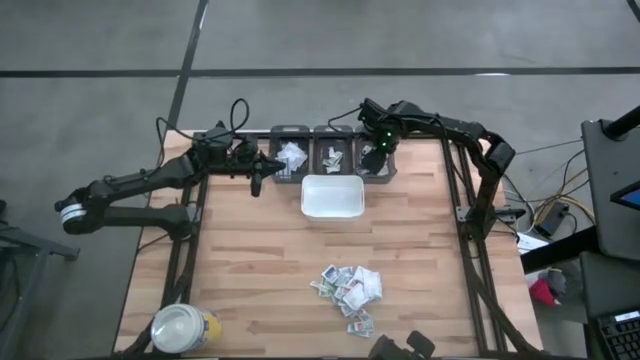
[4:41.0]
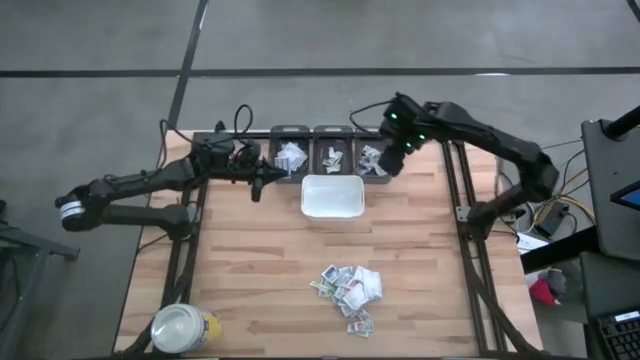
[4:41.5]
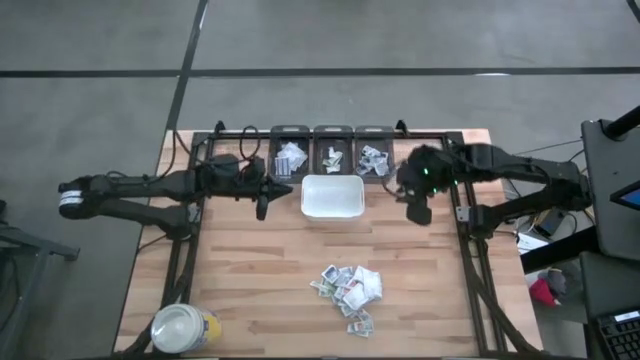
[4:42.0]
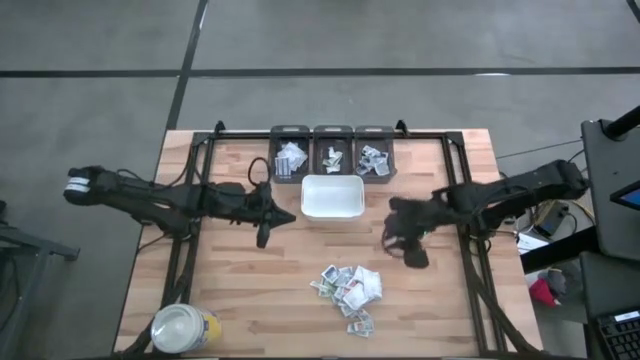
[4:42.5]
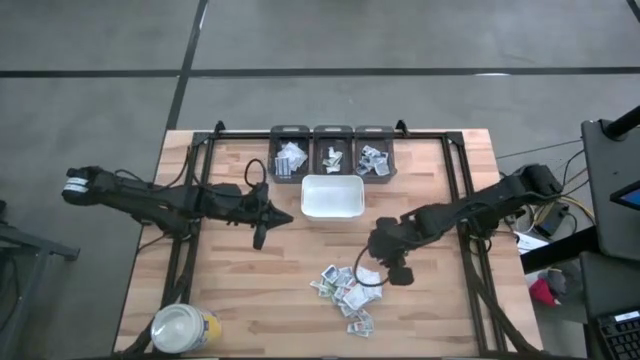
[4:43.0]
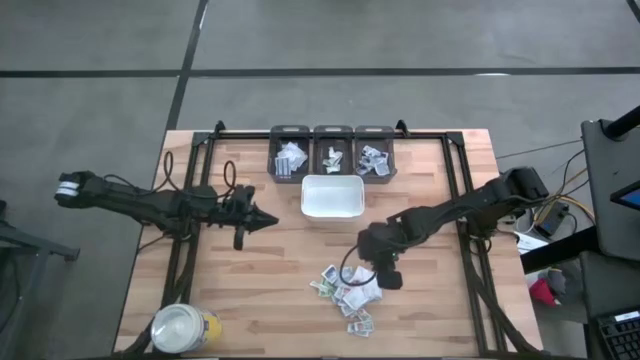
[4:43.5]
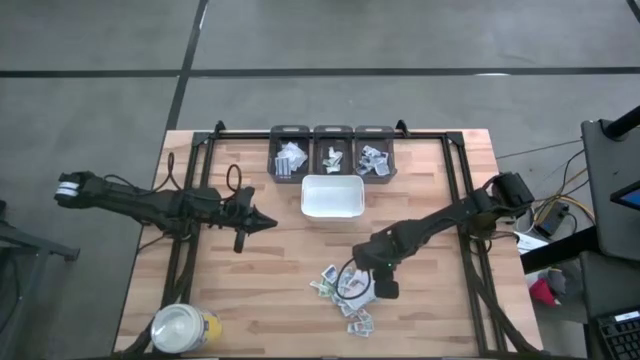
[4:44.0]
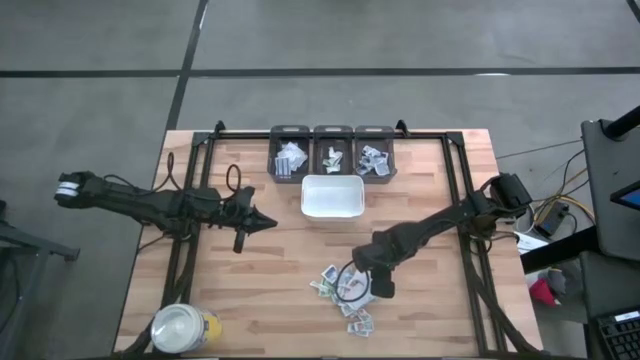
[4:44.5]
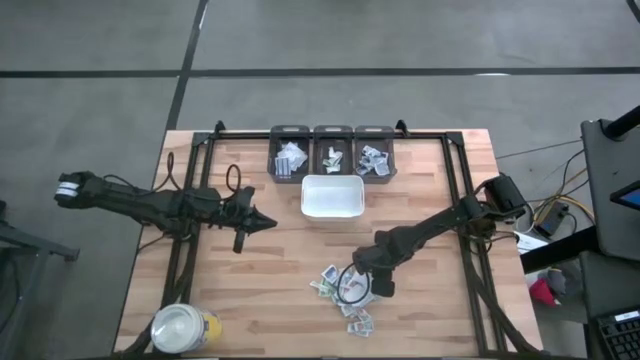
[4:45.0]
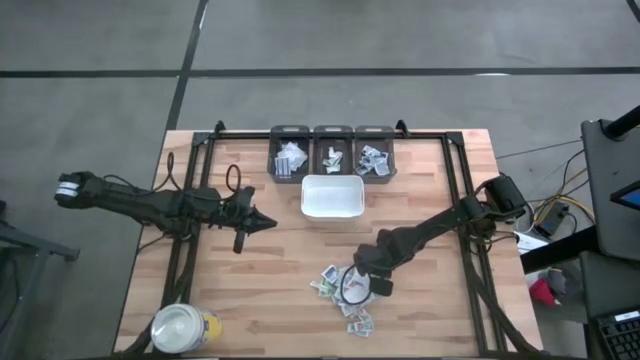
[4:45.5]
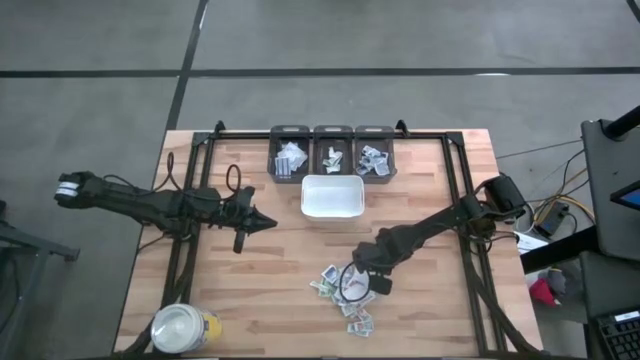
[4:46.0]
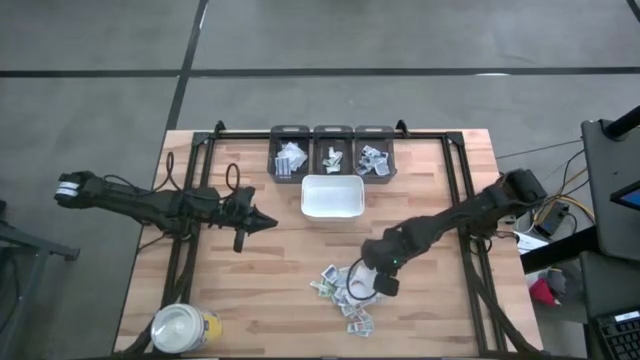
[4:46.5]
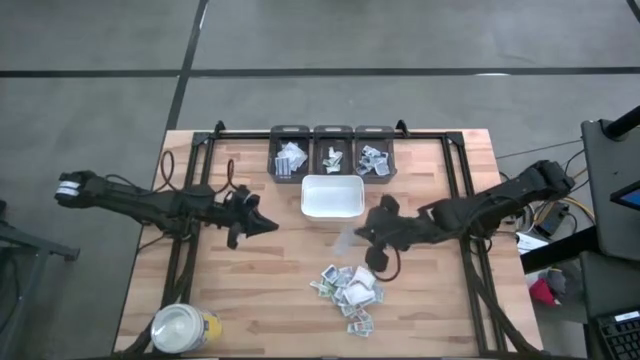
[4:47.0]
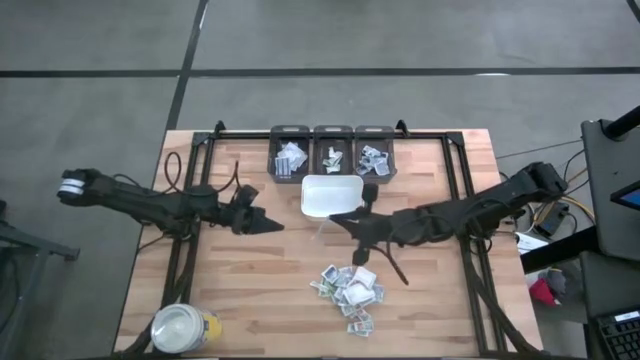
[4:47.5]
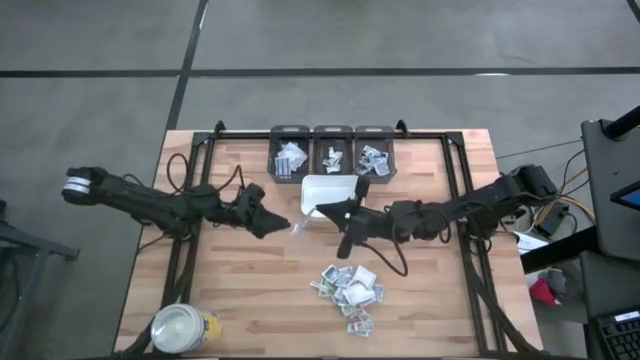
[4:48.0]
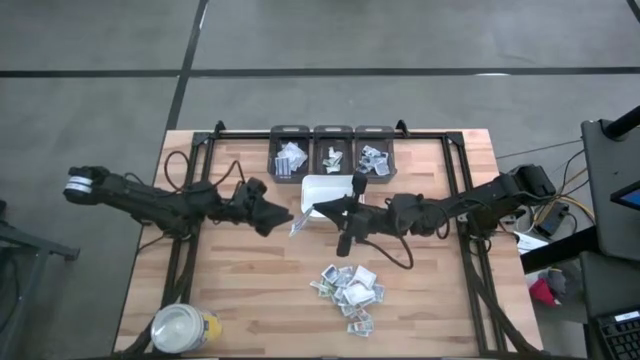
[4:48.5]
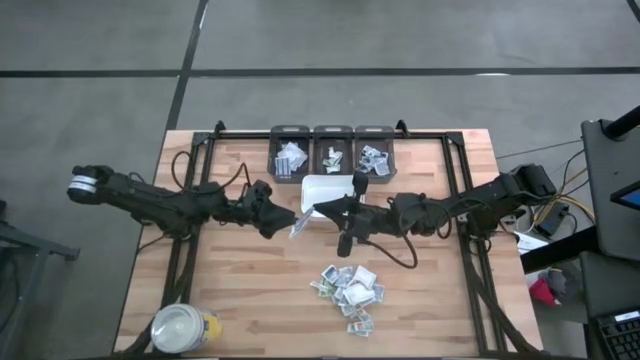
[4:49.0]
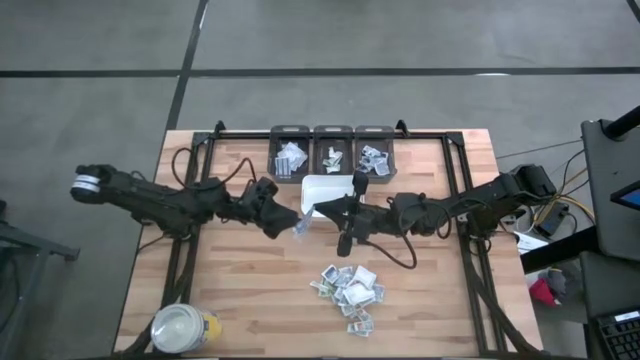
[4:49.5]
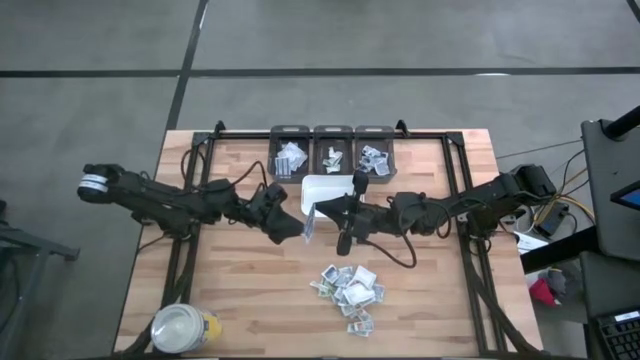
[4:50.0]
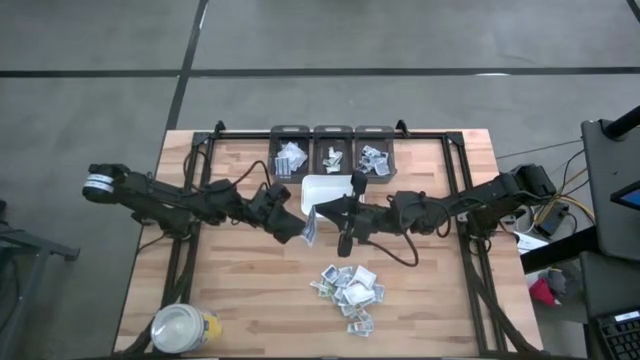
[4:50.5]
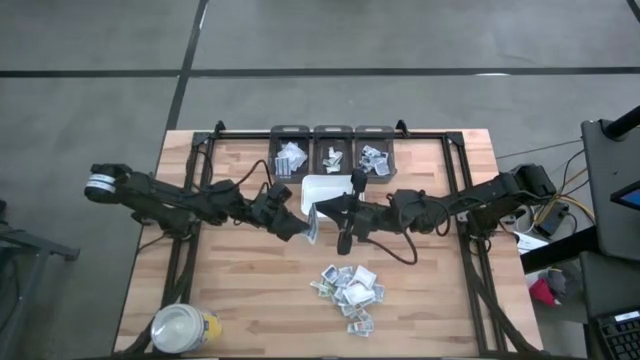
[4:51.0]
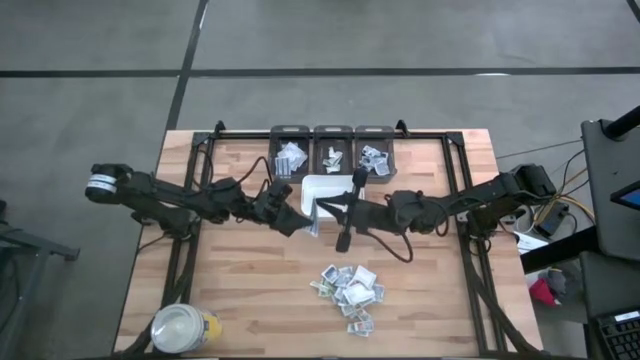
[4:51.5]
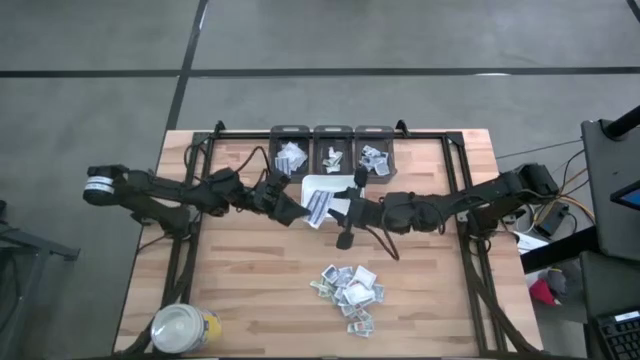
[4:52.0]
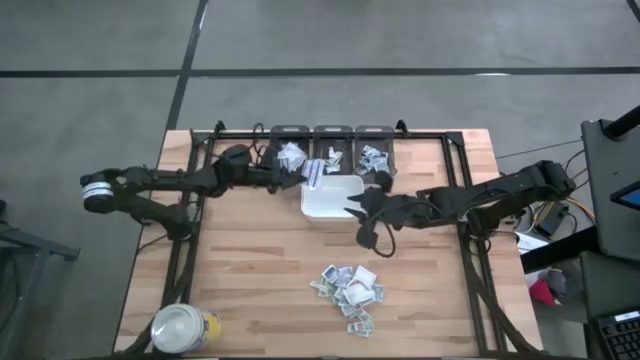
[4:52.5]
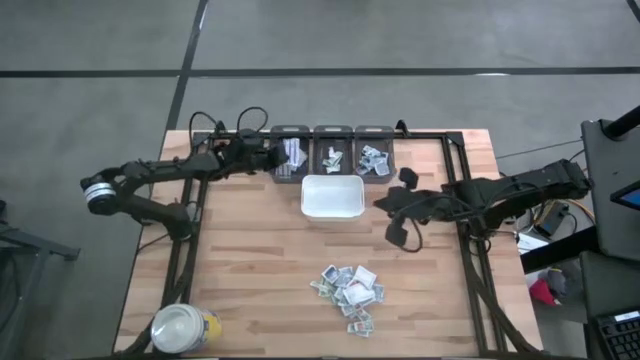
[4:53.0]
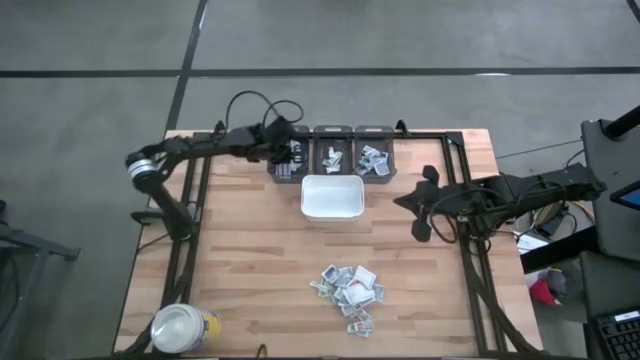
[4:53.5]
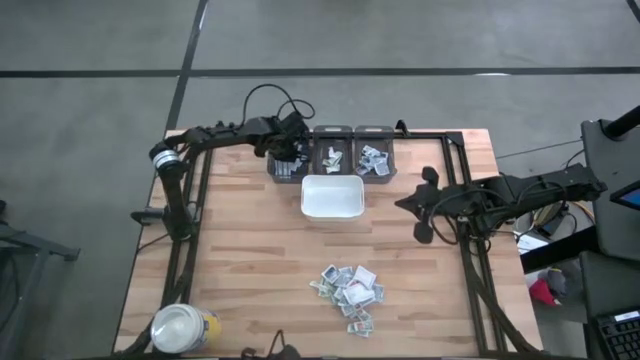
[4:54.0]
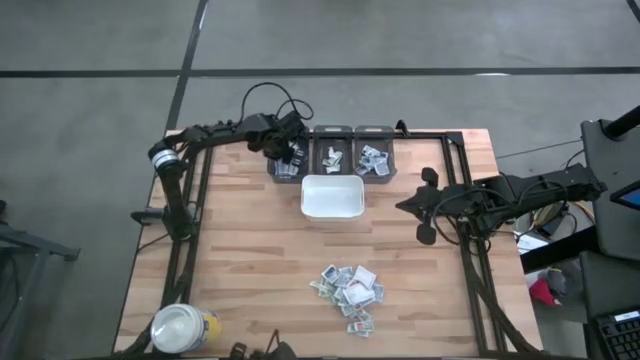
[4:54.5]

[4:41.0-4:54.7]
Task: Pick & Place First Aid Supplies
Put the white fingertip band aid into the left black bin

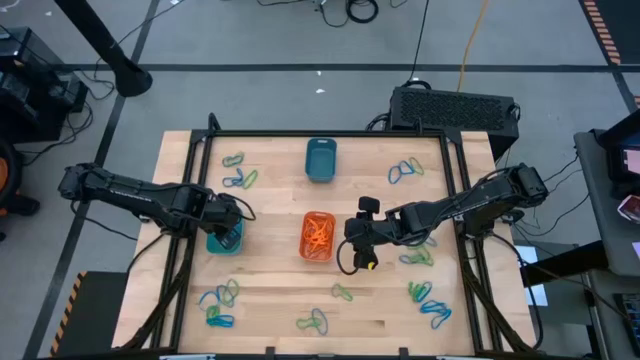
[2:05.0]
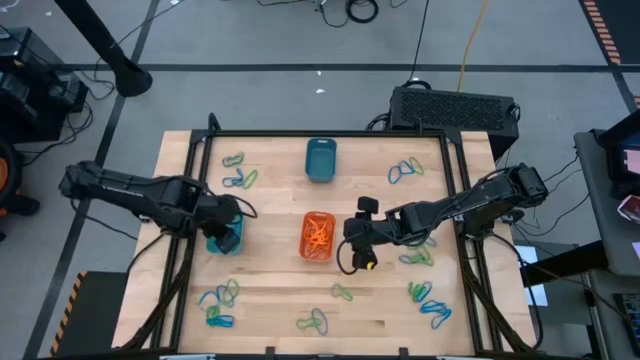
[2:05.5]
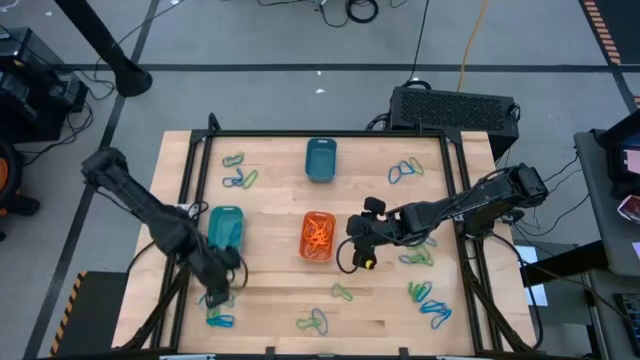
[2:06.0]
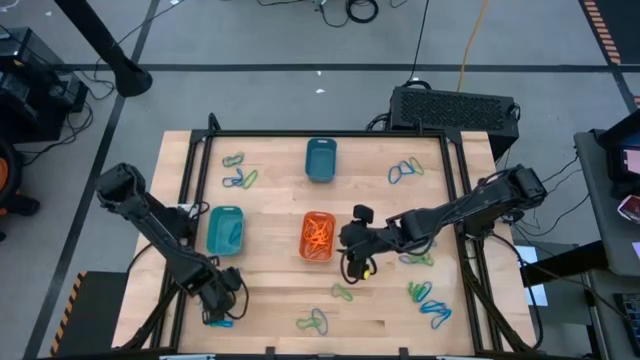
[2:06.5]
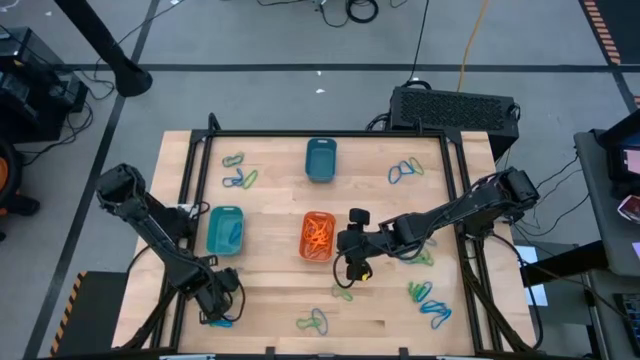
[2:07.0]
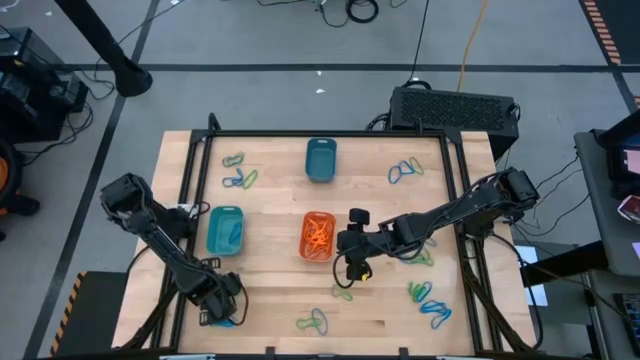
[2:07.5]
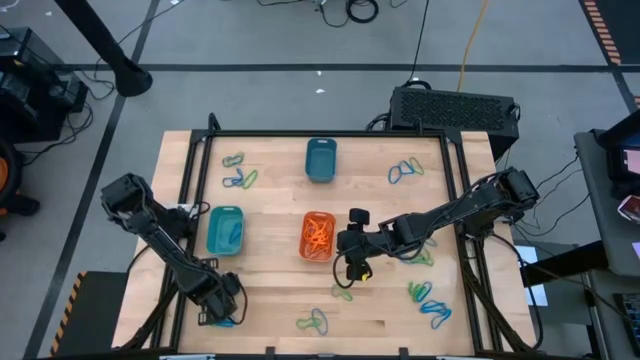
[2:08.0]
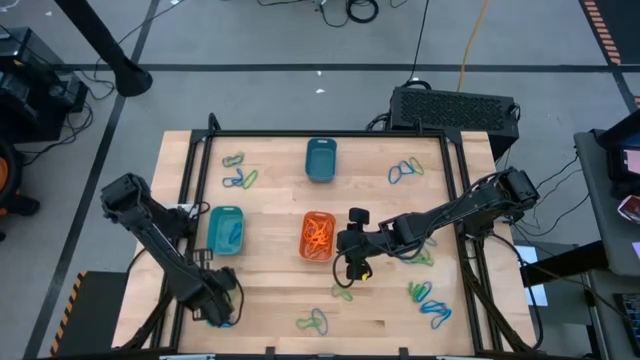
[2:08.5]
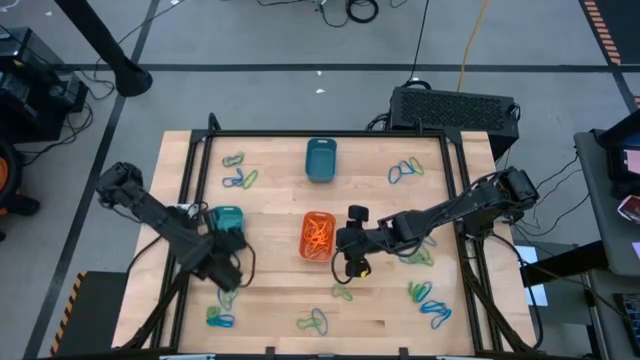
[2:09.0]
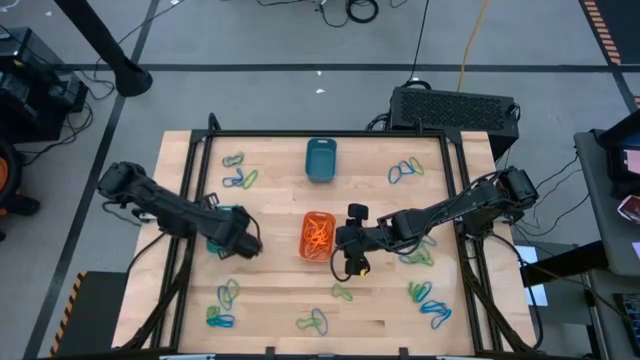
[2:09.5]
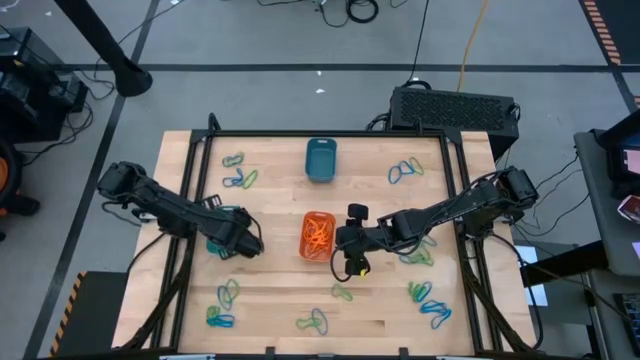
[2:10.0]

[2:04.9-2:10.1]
Task: Sort rubber bands into baskets
Put the blue rubber band into the green bin
